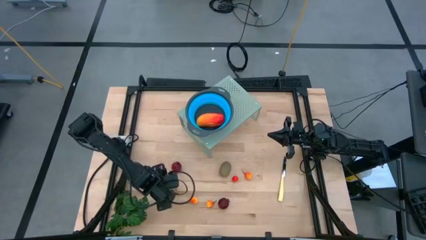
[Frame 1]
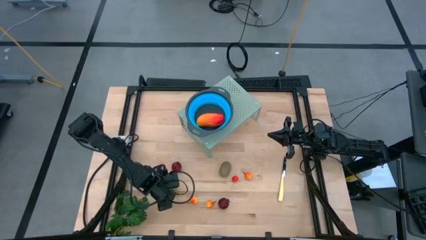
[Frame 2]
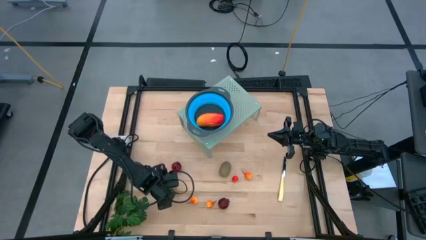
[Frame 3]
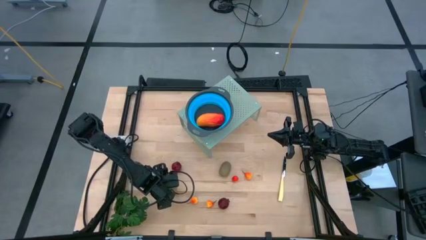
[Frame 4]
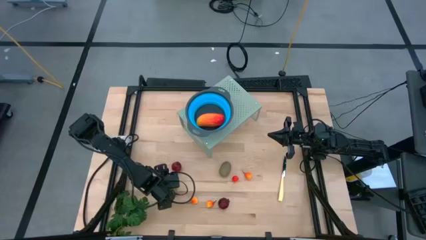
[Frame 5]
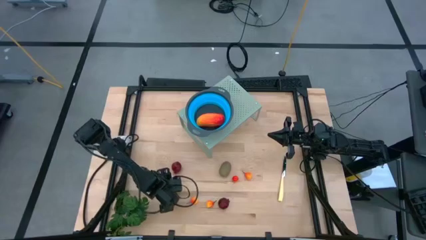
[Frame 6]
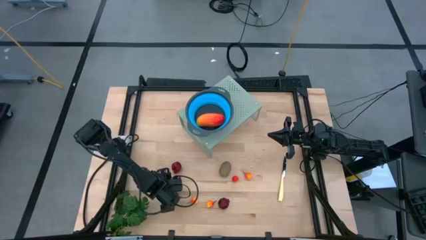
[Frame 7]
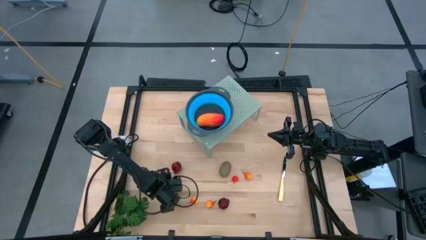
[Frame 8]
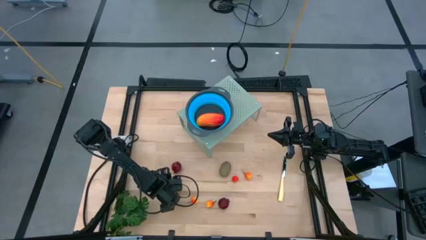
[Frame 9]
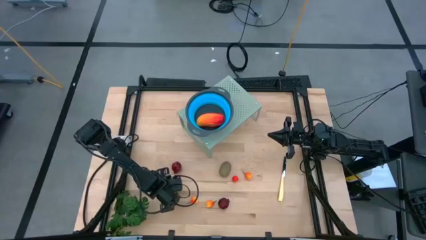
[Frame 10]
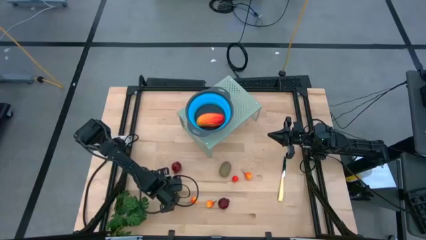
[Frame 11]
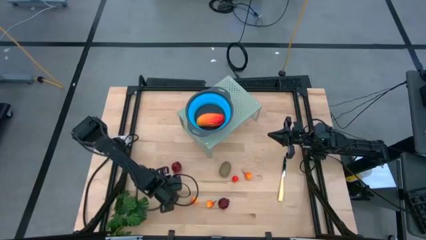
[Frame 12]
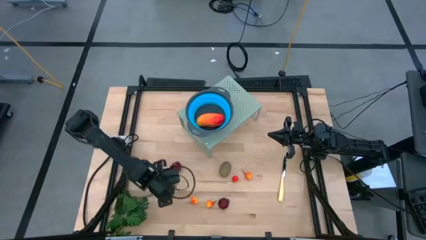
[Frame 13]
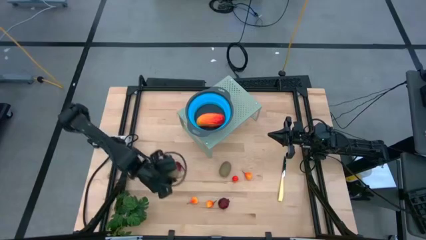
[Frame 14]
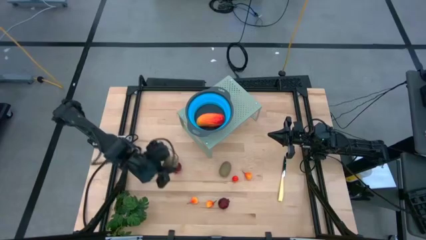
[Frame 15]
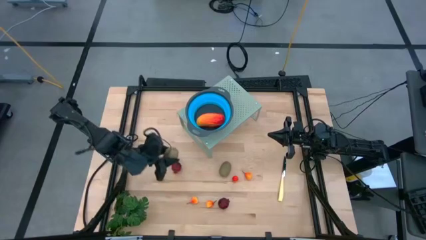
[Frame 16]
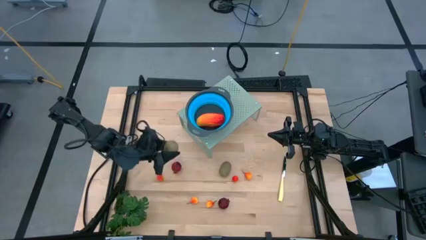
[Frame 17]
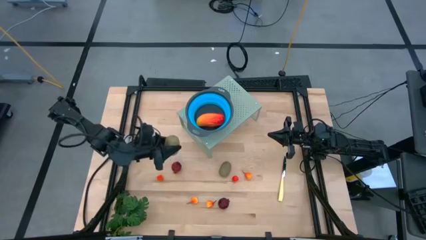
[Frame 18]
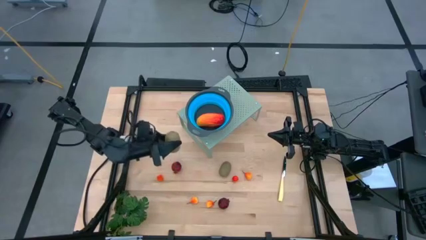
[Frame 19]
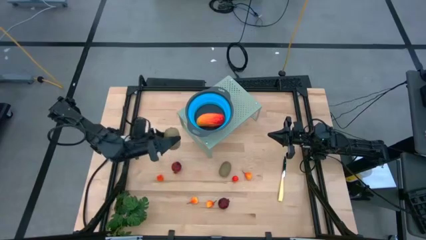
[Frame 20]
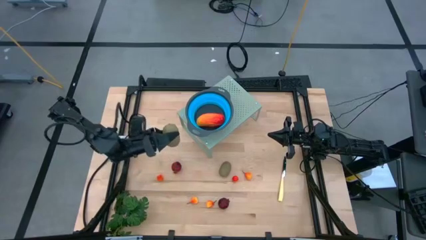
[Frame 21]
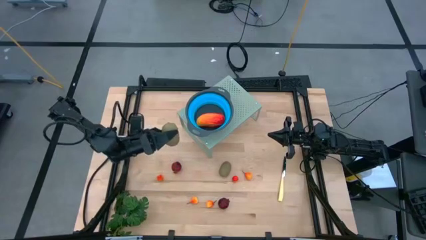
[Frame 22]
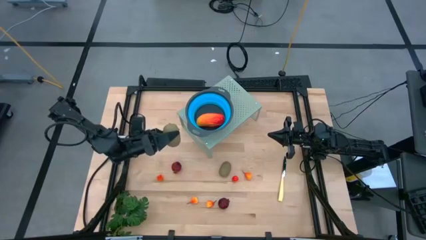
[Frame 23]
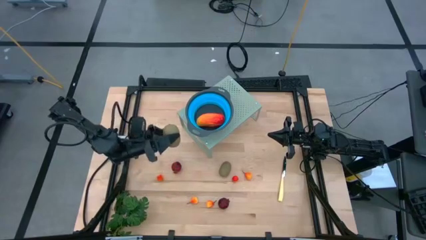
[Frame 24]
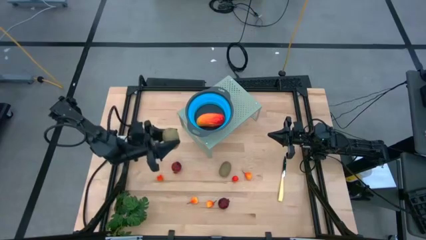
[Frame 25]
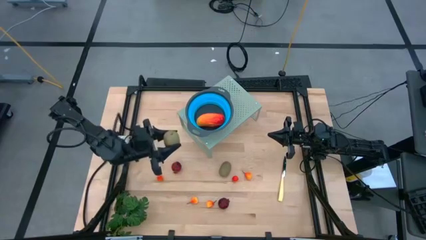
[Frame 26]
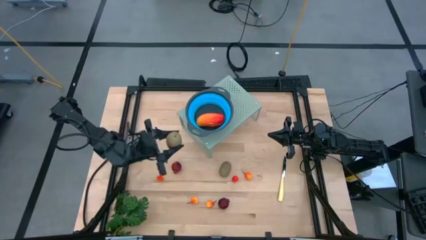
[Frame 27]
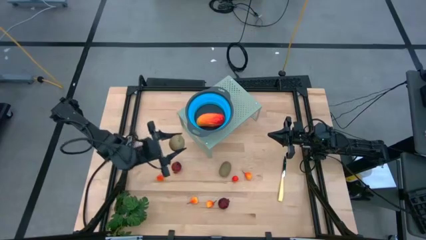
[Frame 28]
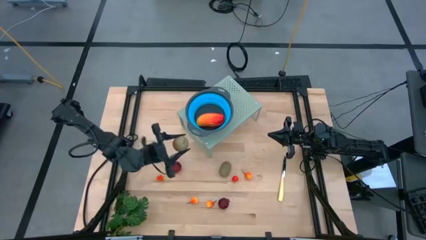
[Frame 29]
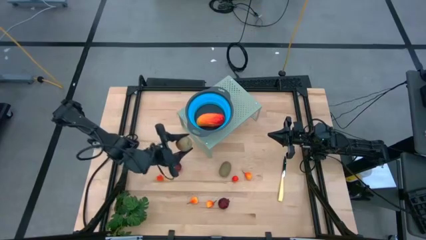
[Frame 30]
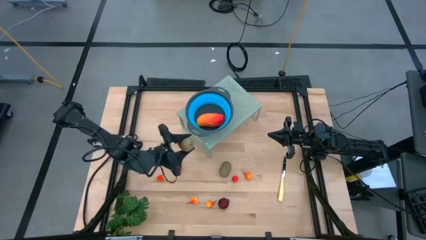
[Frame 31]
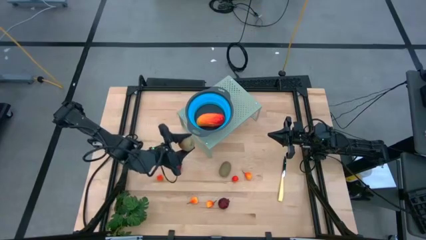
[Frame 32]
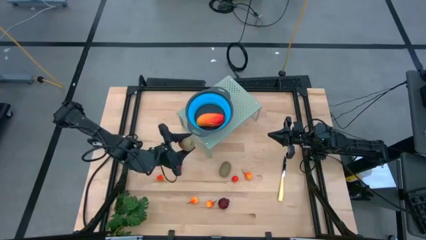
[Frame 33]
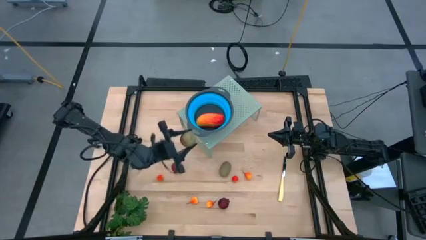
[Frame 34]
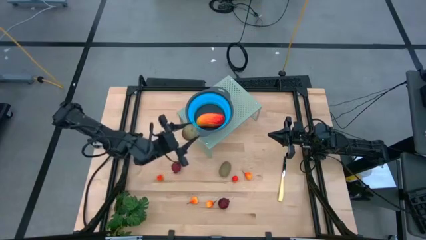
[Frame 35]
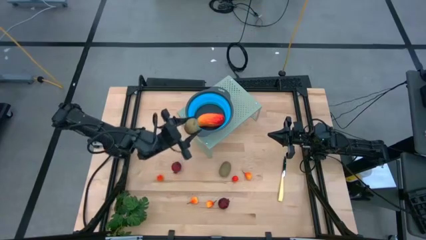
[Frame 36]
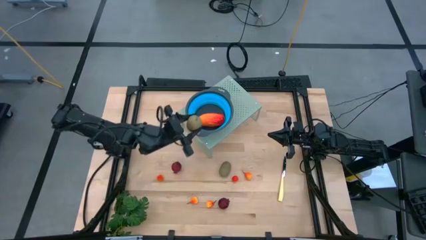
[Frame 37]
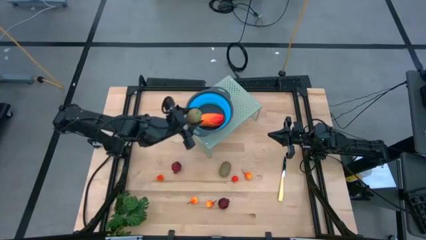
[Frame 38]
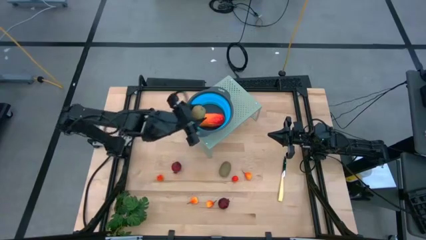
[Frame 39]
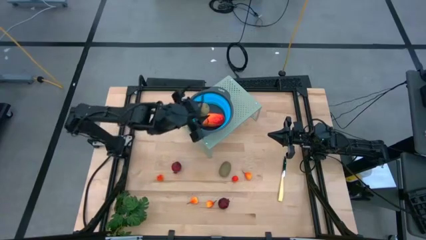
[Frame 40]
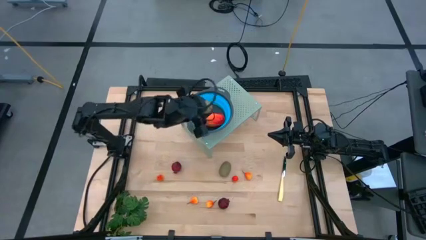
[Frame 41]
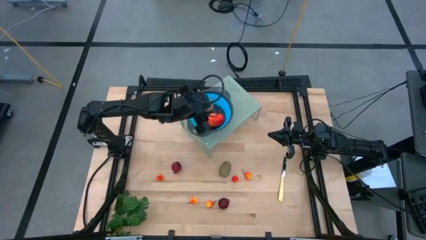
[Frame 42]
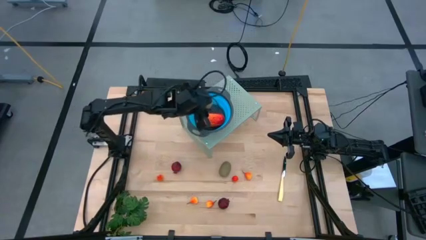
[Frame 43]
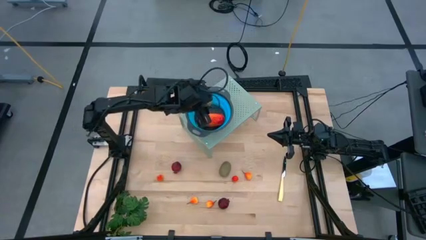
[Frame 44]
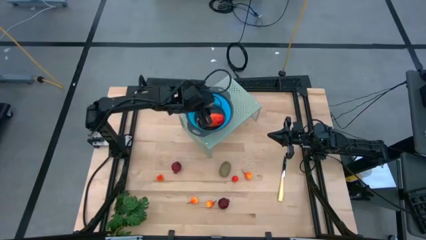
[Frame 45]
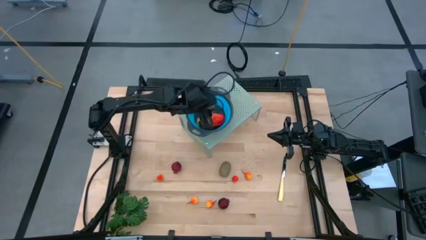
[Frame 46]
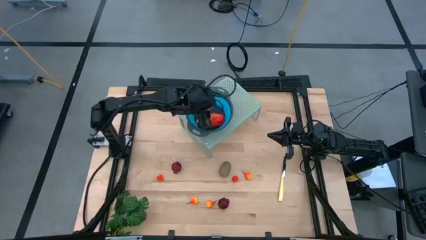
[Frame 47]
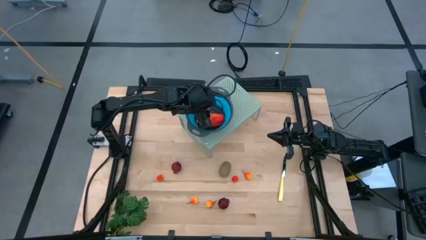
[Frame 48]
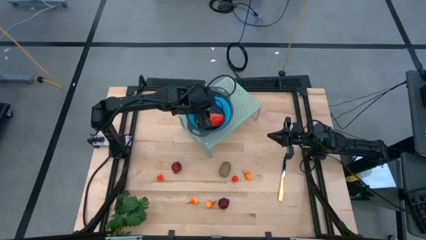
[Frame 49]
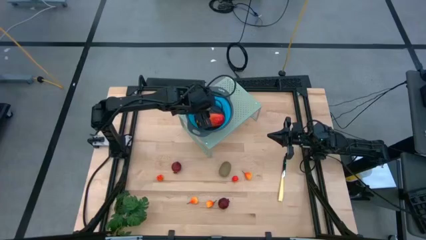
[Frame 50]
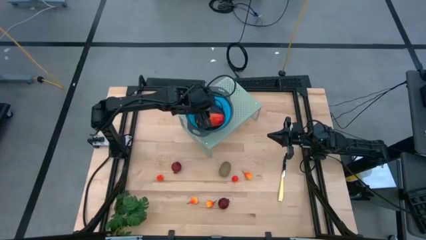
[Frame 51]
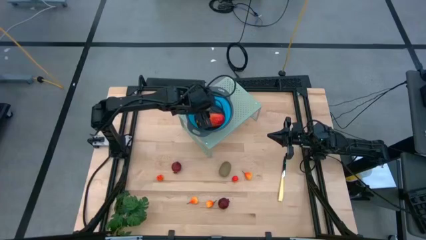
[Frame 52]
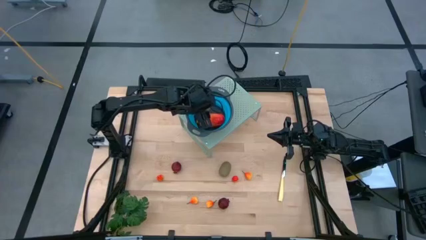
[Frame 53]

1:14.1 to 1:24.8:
Task: Pick & Place Fruit
Put the kiwi into the blue strainer bowl on the shelf
